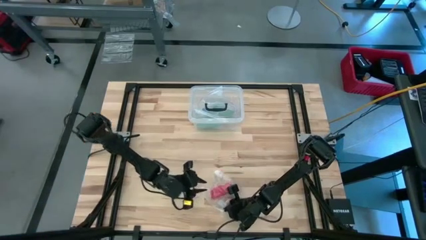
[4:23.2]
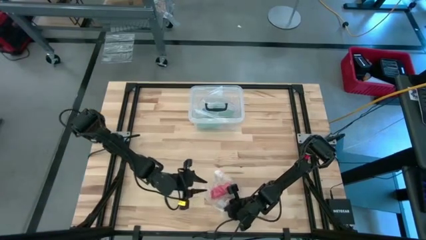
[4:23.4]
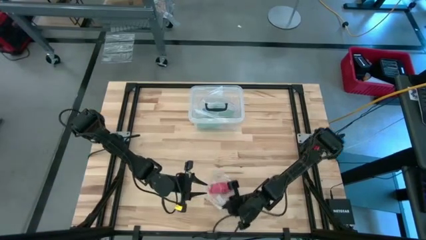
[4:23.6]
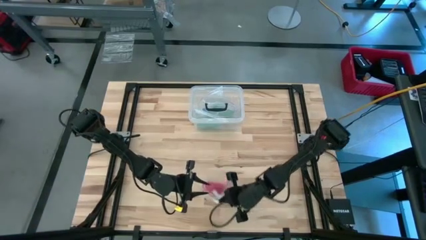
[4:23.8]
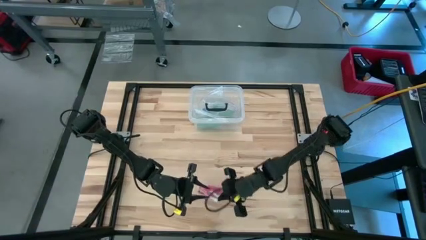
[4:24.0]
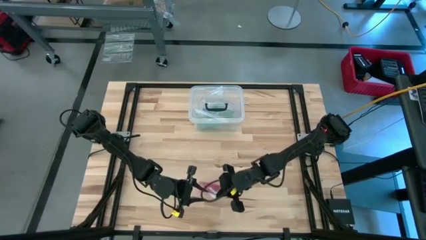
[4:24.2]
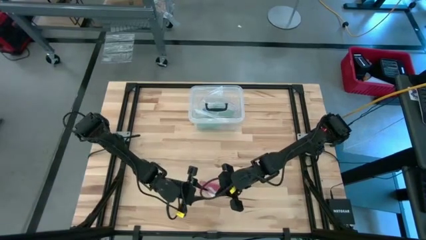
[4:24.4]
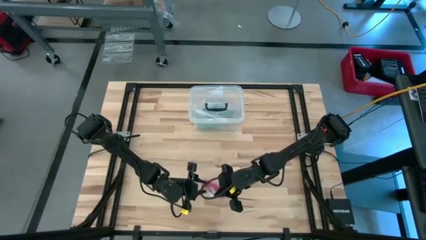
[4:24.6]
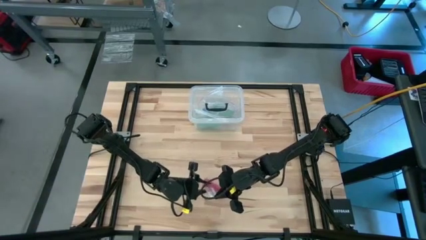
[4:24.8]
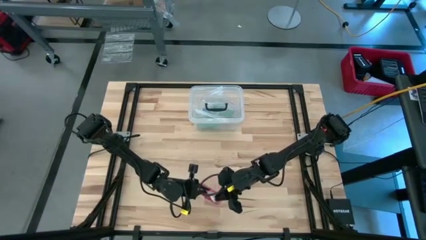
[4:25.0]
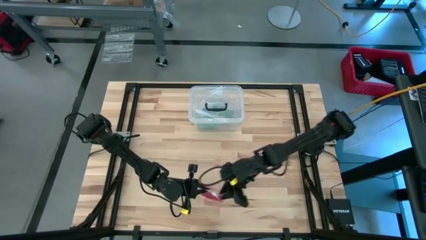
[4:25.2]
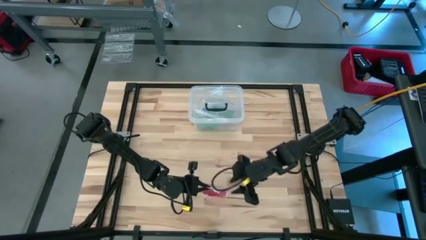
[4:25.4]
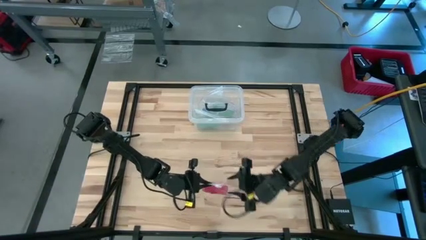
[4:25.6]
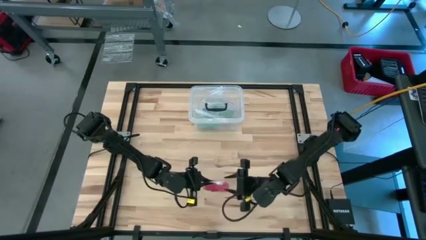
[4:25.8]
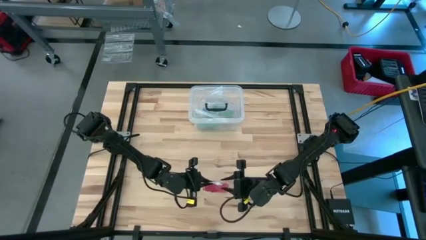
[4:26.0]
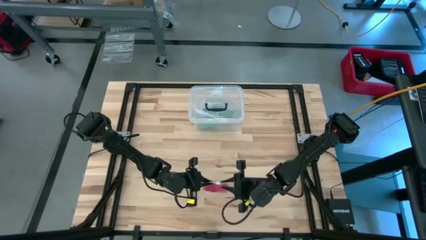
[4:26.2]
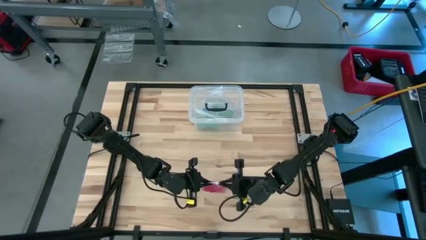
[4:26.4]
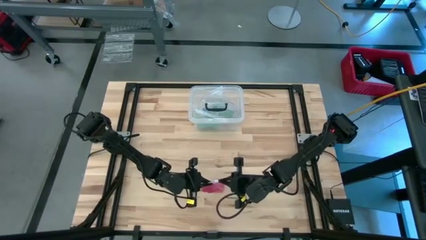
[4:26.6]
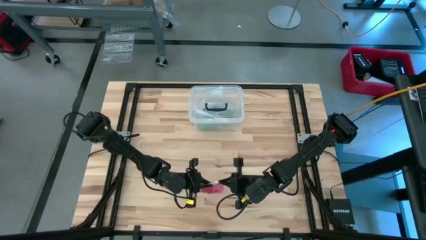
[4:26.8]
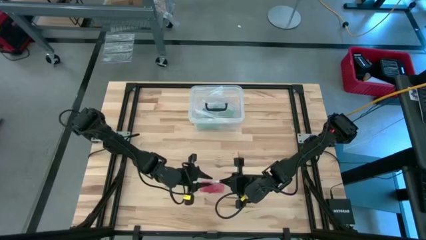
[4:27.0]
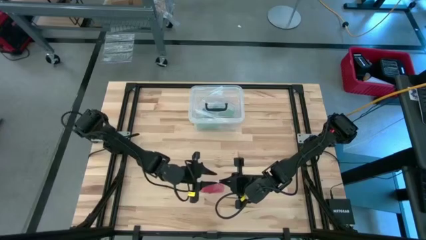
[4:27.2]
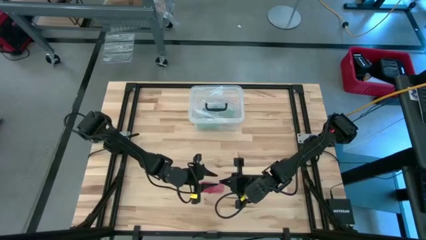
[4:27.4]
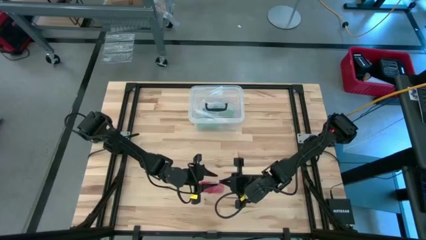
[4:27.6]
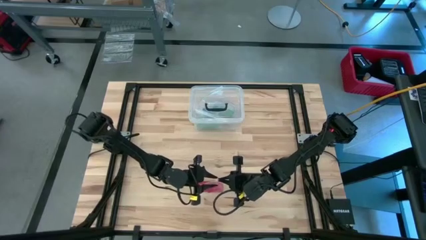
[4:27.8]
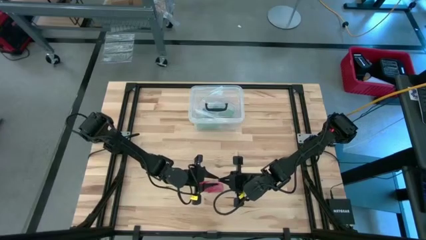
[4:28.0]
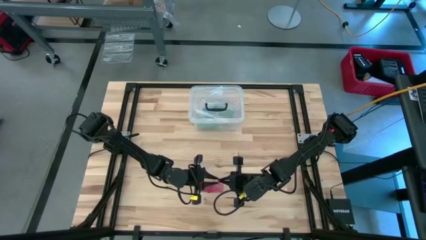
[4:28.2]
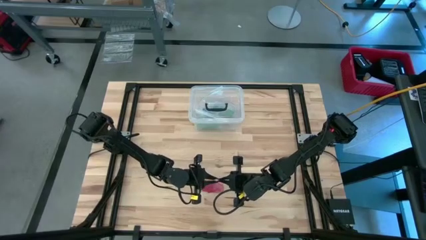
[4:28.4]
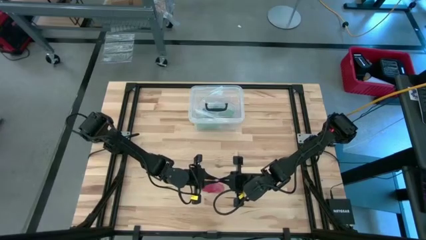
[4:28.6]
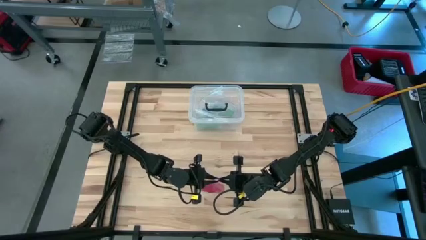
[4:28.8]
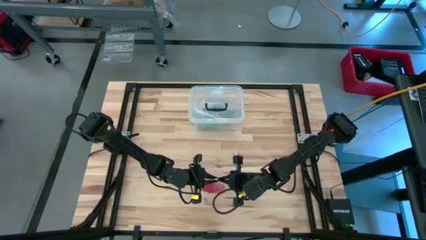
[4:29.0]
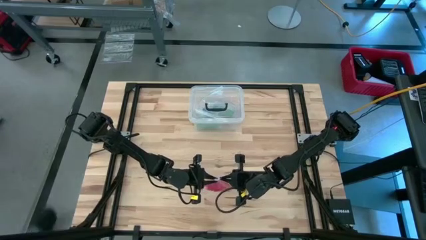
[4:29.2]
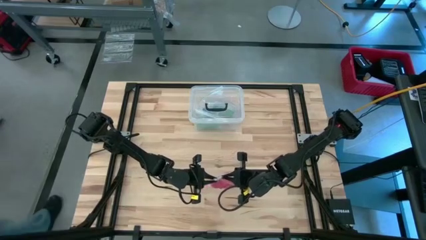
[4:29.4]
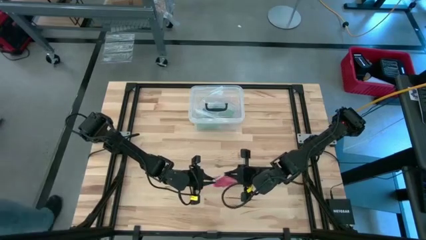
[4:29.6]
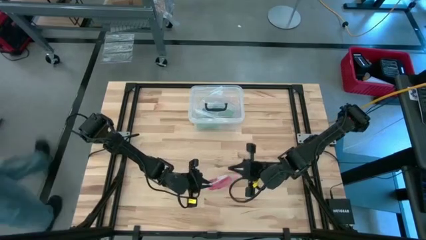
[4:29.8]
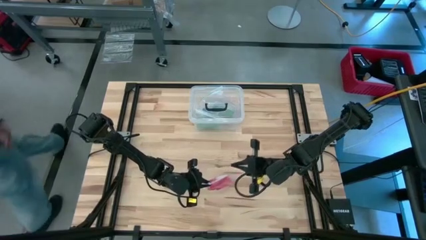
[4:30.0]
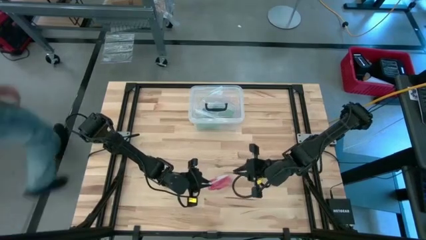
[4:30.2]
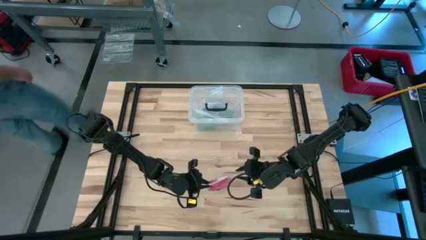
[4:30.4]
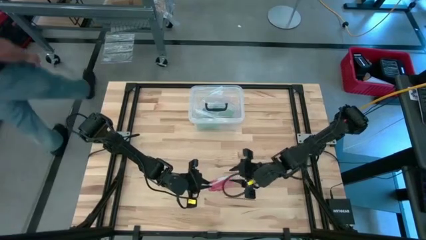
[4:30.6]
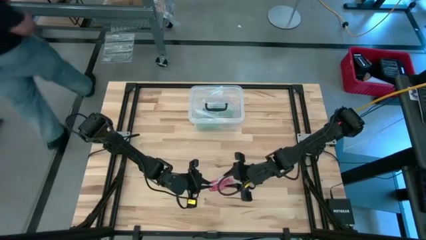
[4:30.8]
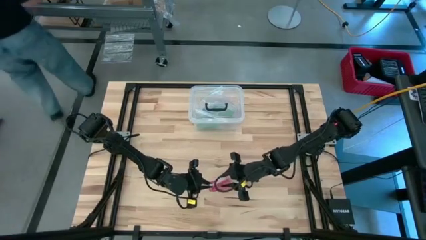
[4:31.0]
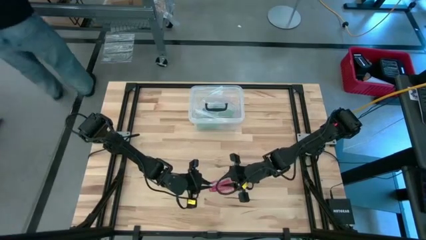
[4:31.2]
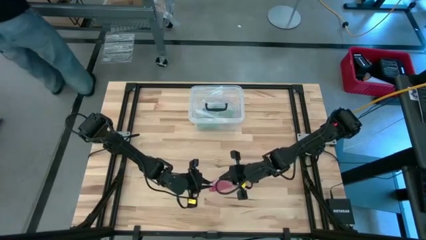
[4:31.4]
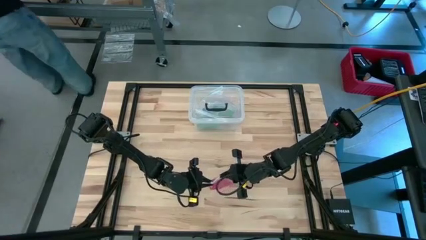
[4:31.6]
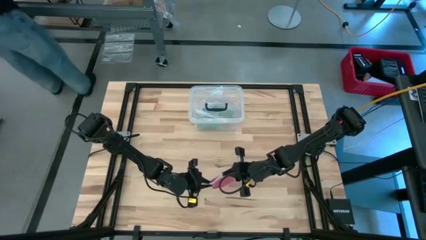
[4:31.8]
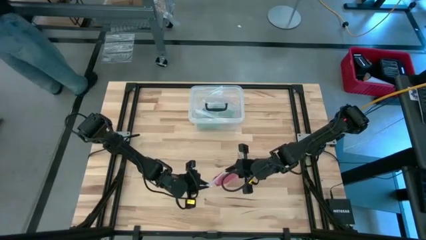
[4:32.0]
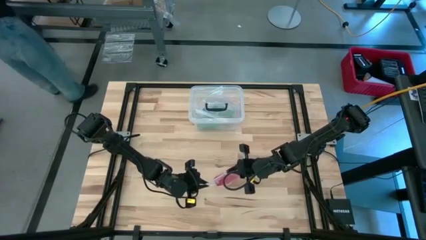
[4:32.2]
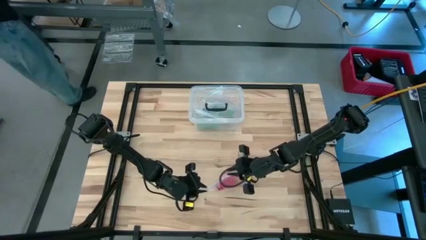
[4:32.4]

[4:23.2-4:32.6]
Task: Roll bandage
Close the transparent zip bag

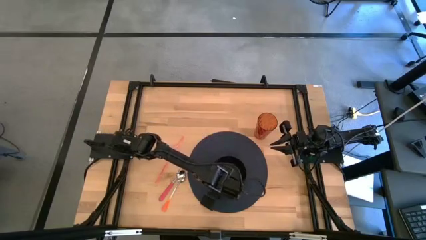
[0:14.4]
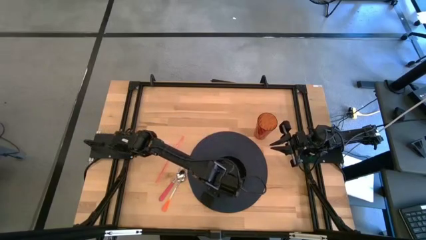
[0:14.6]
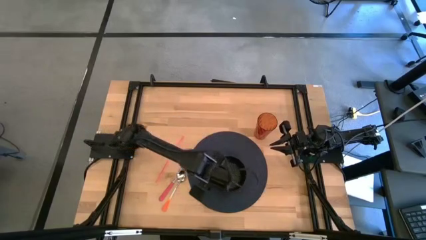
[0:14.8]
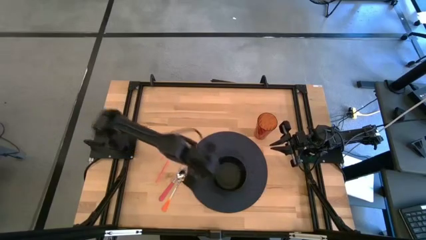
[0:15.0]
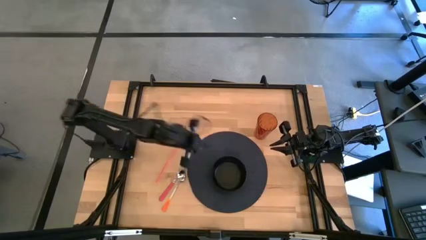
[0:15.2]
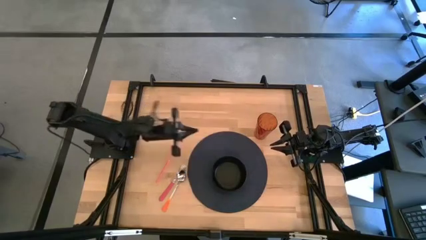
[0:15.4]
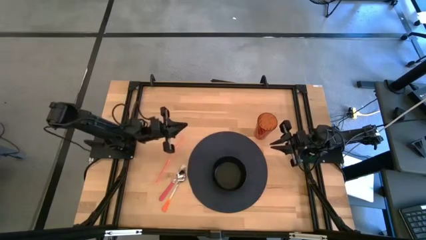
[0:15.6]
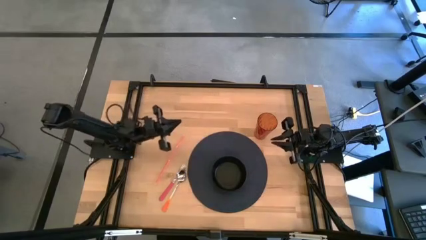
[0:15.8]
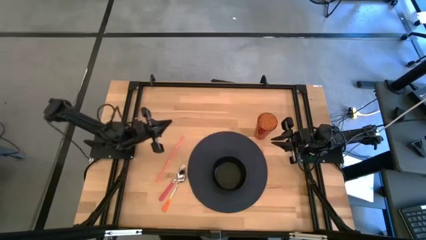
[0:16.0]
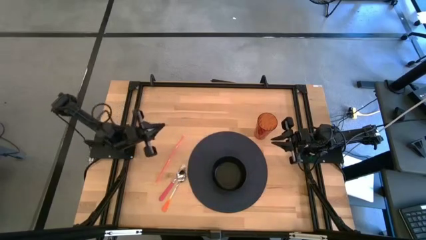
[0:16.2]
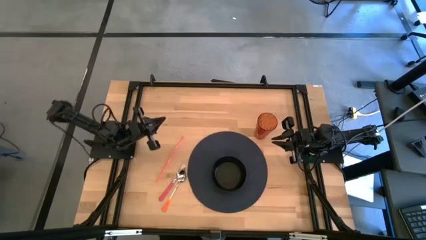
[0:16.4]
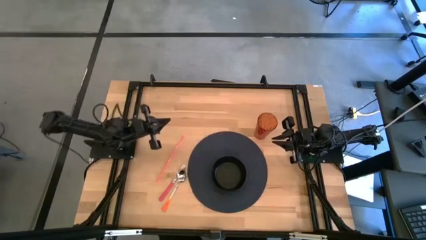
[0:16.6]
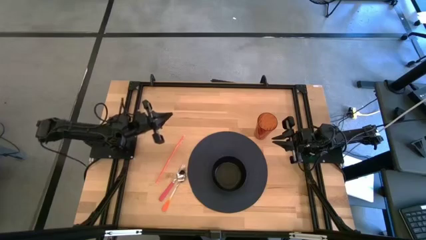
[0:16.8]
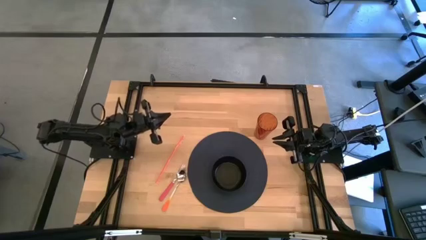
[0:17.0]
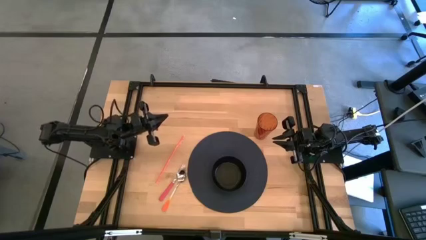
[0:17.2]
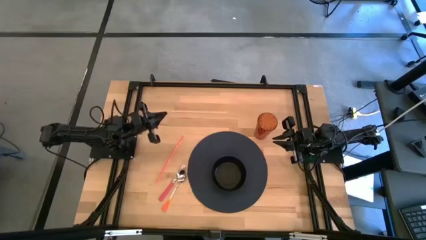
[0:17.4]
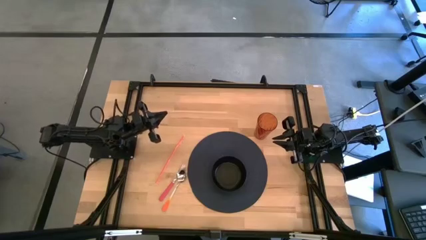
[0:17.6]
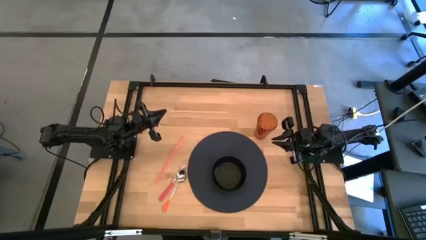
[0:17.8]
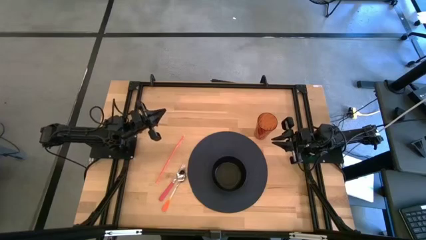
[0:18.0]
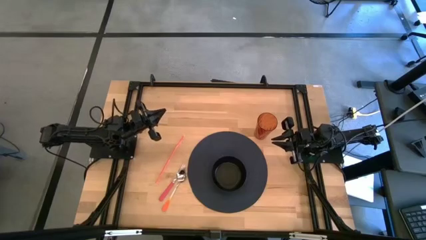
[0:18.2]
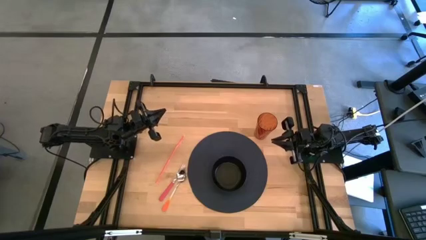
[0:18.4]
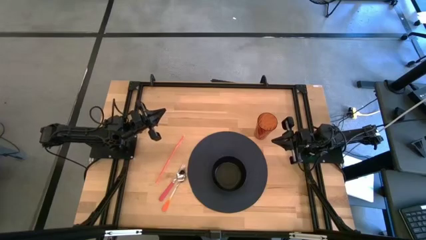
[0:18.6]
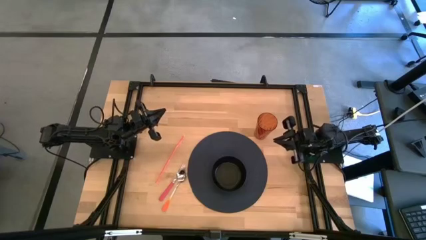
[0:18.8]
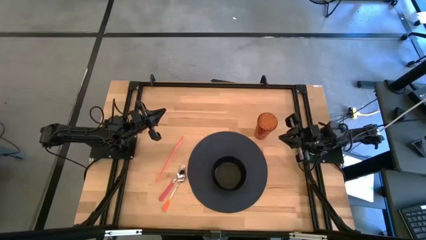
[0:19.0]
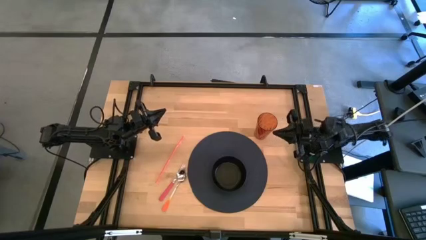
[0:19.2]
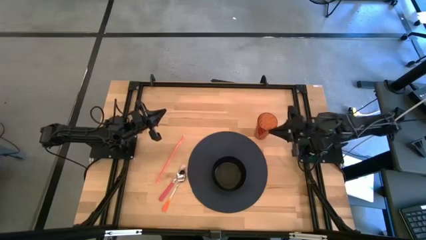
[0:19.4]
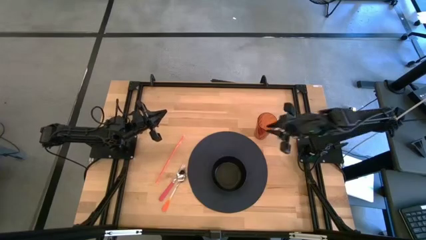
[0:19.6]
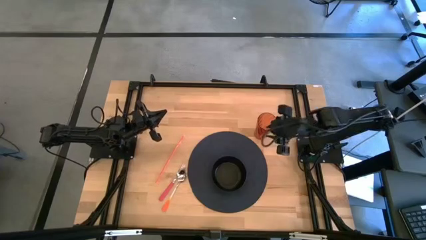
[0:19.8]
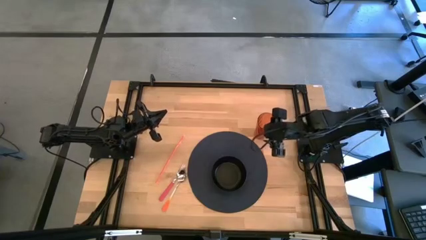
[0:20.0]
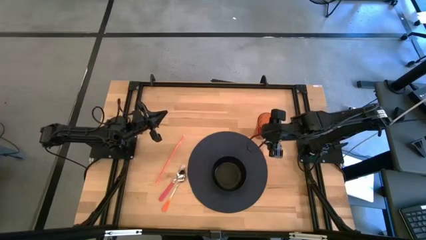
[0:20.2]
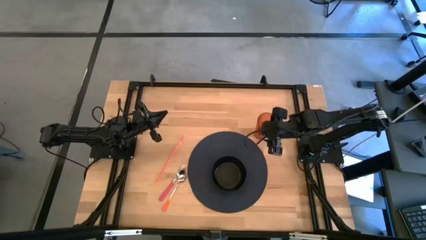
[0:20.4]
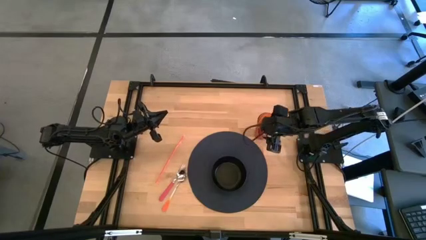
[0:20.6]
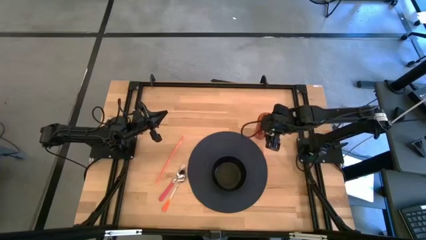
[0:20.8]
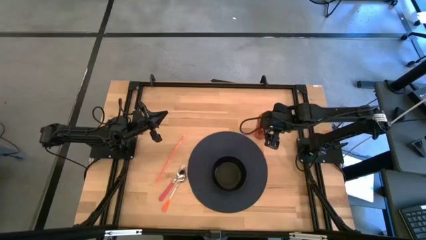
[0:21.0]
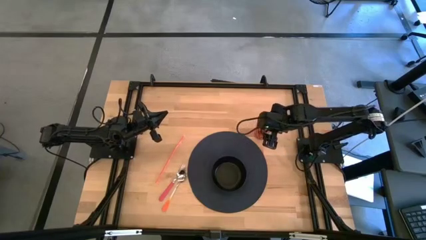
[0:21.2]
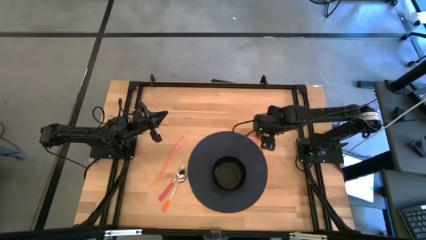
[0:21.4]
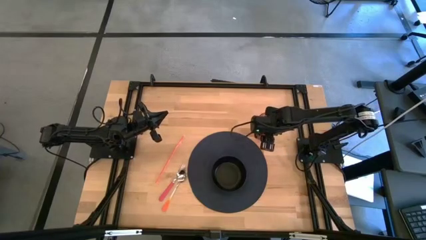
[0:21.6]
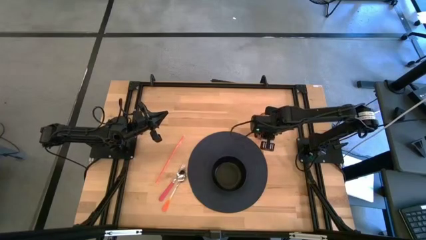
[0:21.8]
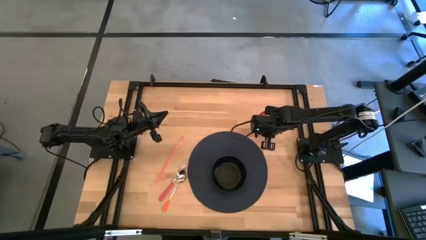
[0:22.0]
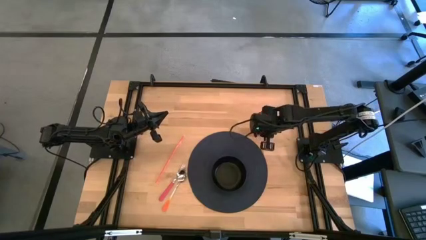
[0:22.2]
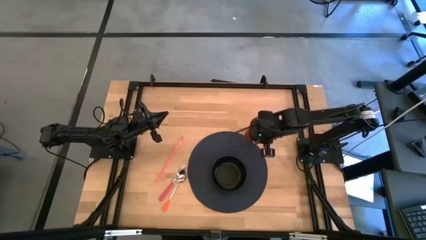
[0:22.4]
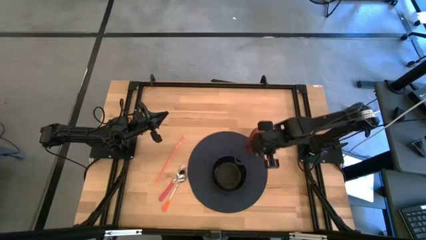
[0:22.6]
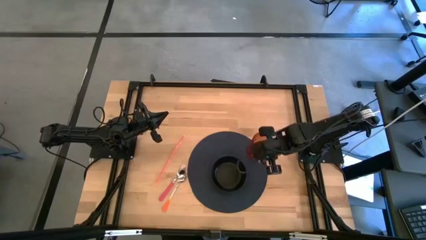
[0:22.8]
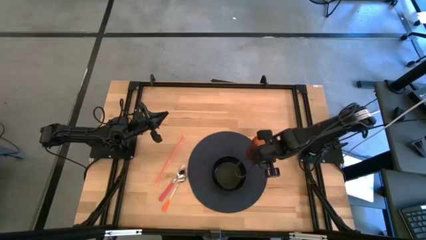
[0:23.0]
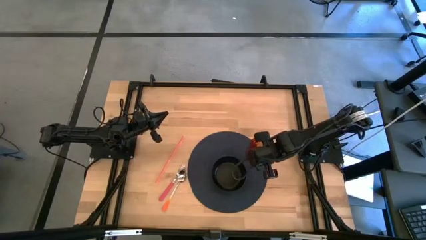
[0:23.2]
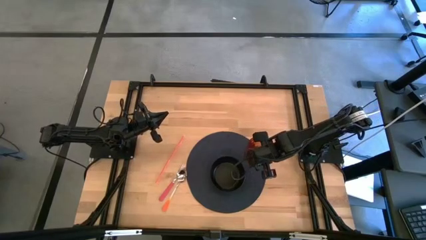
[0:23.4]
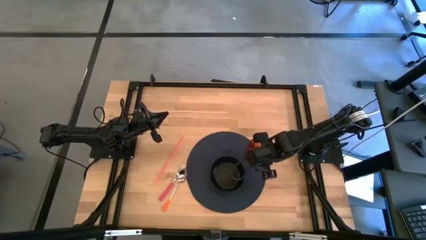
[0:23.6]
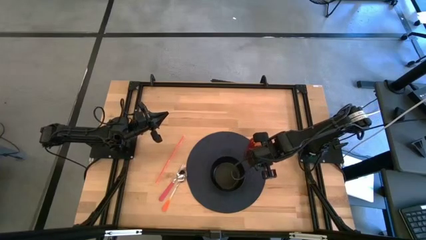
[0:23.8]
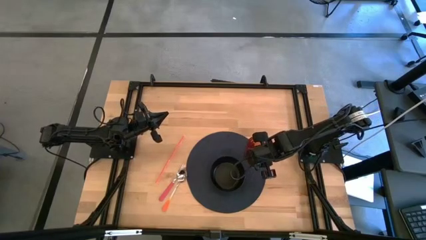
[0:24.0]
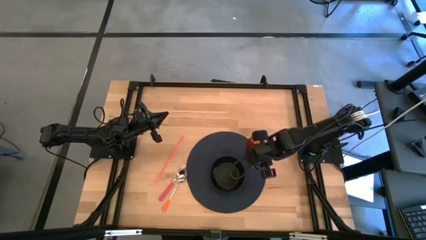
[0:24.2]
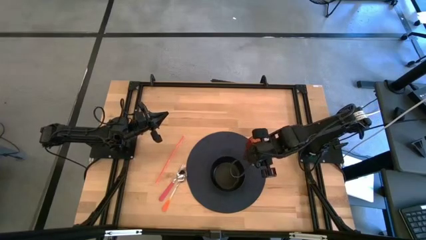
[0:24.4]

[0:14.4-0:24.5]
Task: Pick & Place Utensil
Put the orange glass on the black mat to the top right of the black bowl
